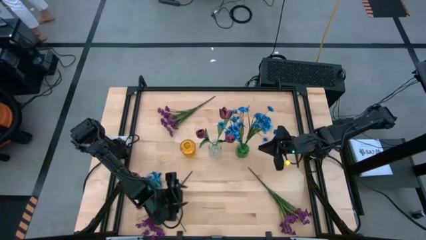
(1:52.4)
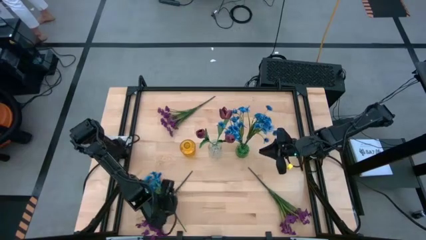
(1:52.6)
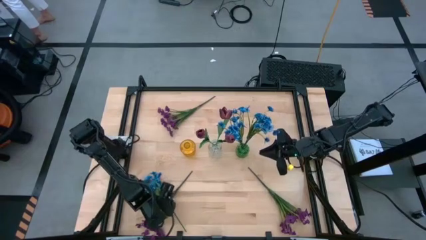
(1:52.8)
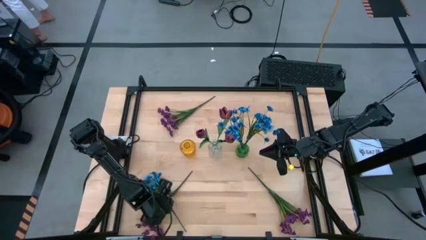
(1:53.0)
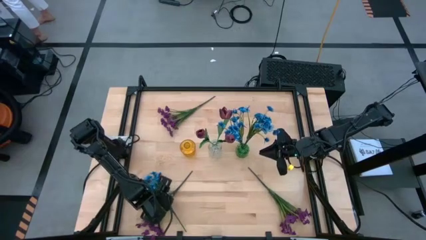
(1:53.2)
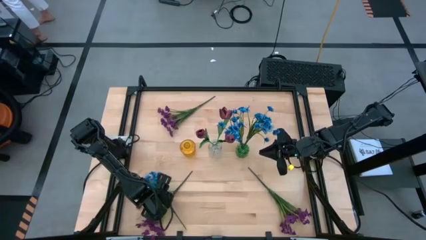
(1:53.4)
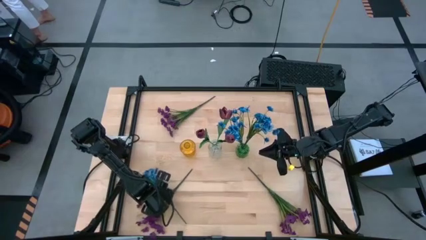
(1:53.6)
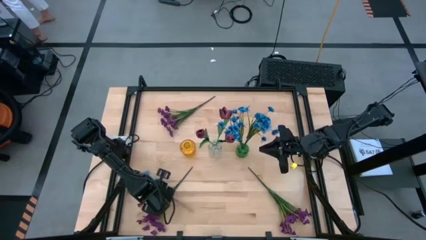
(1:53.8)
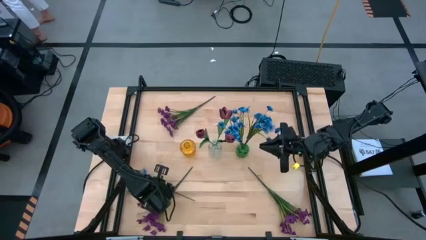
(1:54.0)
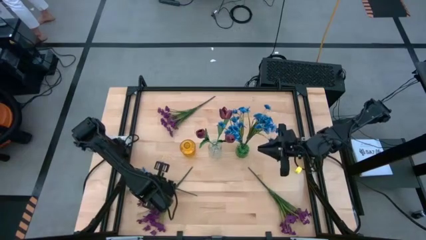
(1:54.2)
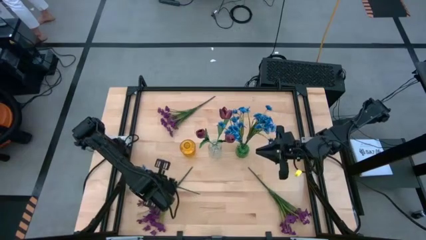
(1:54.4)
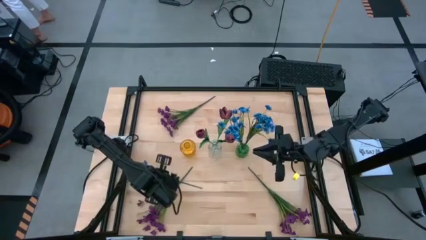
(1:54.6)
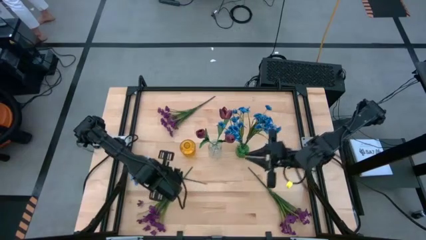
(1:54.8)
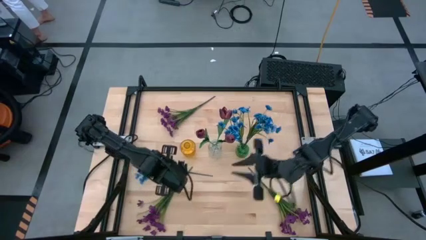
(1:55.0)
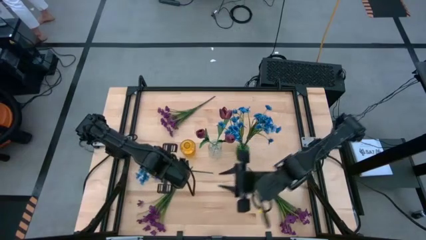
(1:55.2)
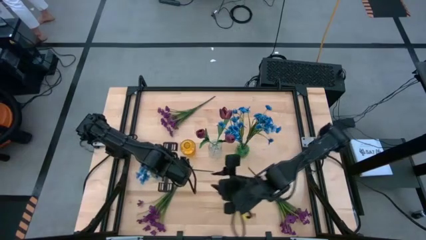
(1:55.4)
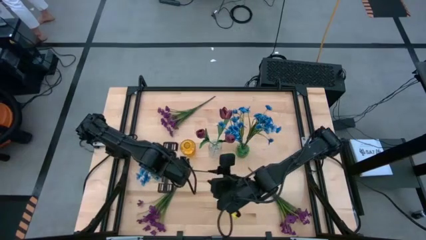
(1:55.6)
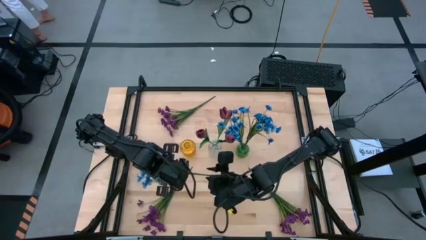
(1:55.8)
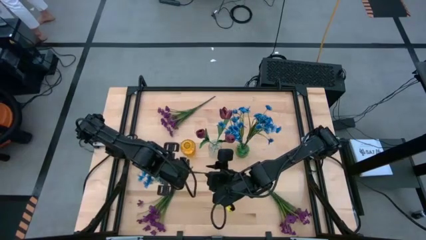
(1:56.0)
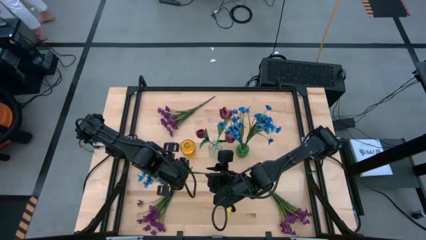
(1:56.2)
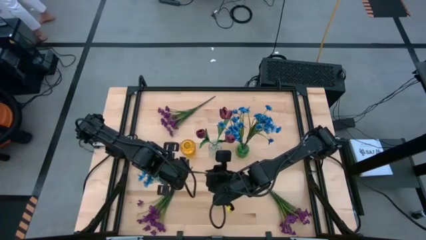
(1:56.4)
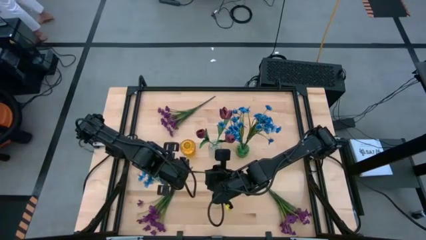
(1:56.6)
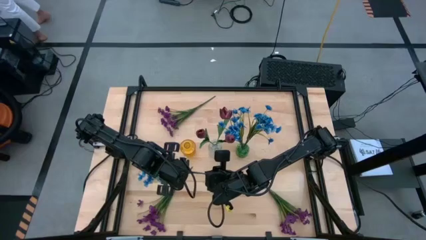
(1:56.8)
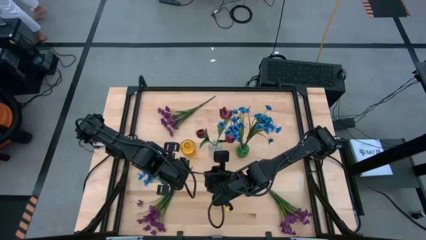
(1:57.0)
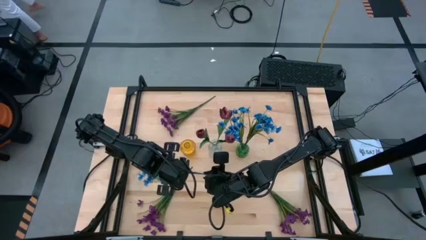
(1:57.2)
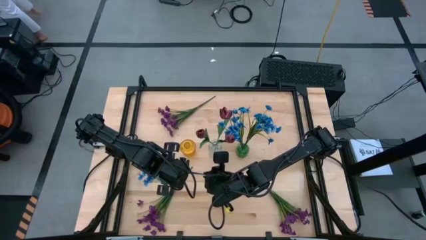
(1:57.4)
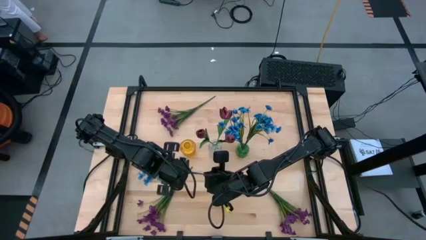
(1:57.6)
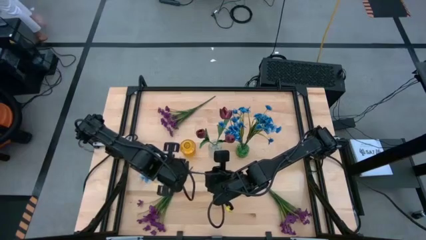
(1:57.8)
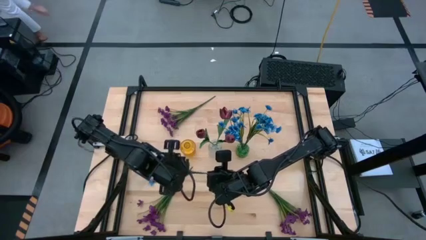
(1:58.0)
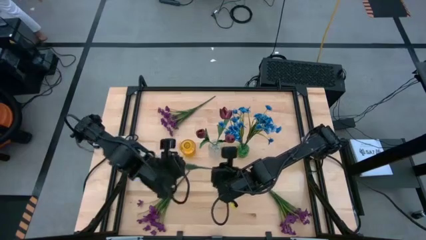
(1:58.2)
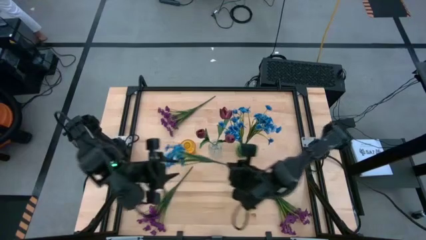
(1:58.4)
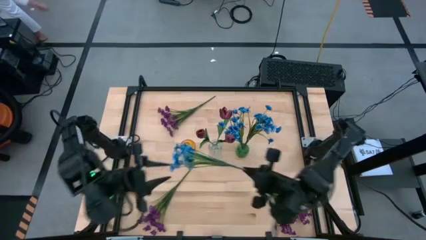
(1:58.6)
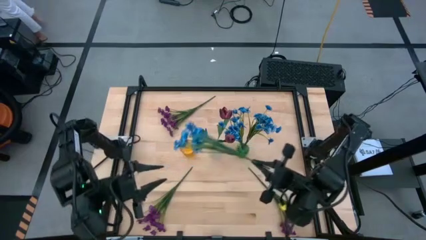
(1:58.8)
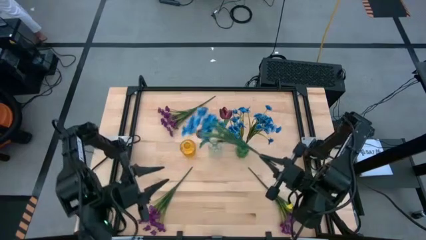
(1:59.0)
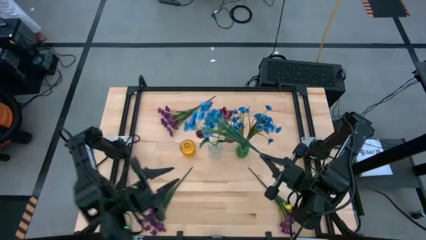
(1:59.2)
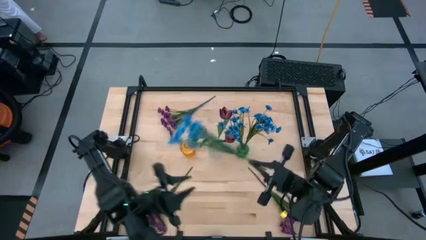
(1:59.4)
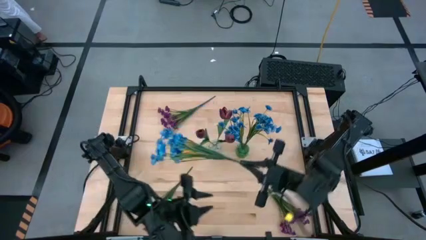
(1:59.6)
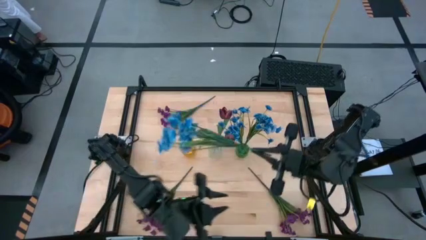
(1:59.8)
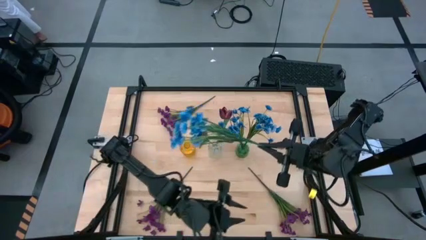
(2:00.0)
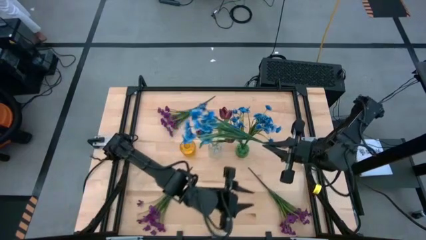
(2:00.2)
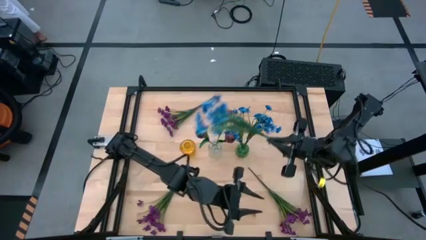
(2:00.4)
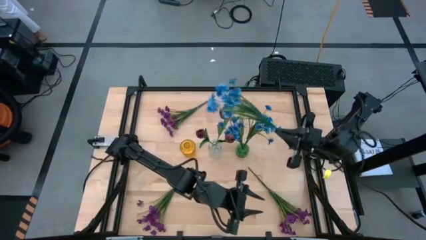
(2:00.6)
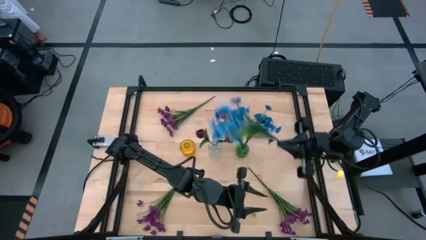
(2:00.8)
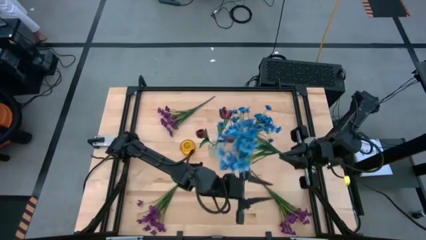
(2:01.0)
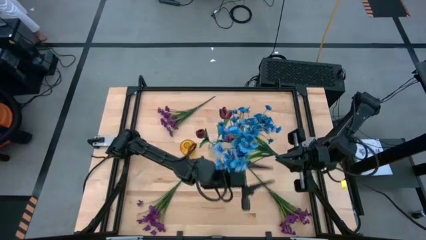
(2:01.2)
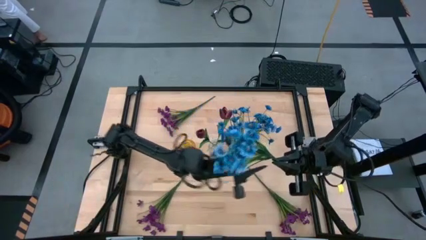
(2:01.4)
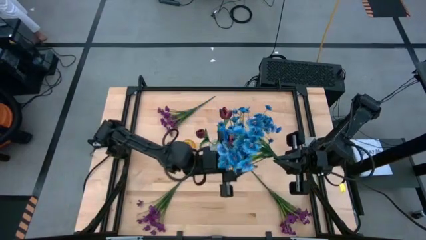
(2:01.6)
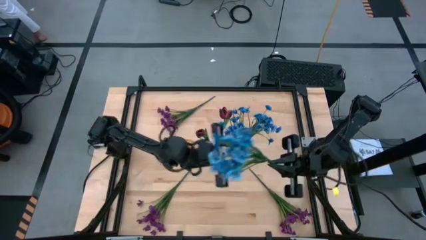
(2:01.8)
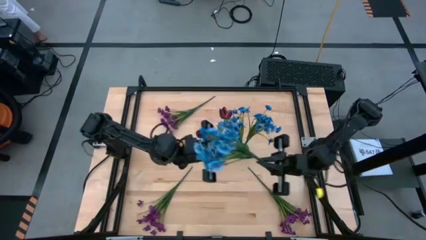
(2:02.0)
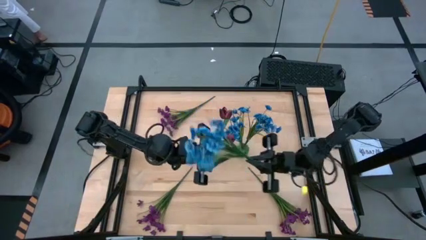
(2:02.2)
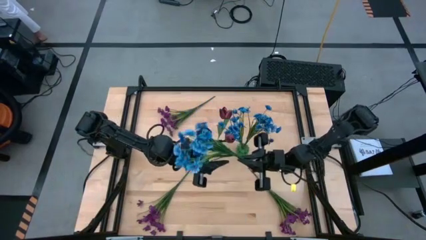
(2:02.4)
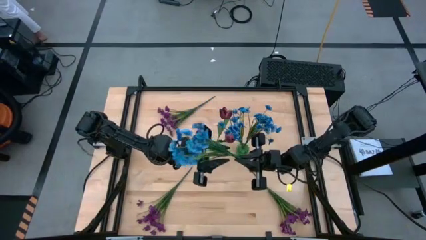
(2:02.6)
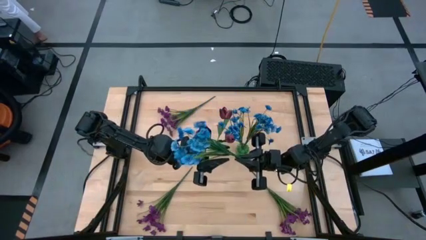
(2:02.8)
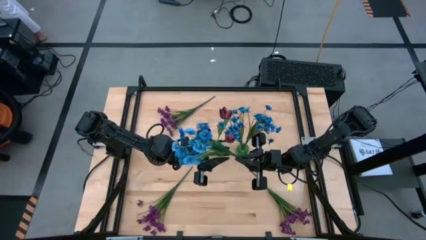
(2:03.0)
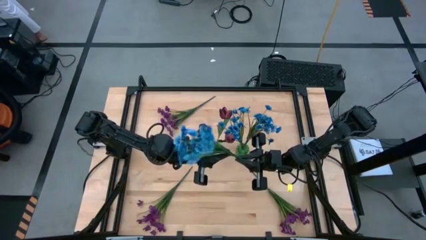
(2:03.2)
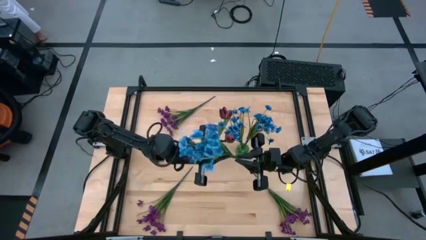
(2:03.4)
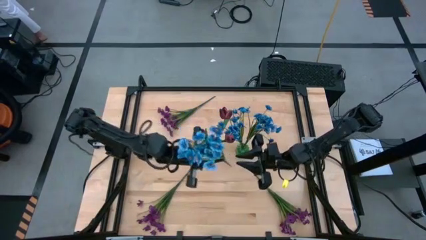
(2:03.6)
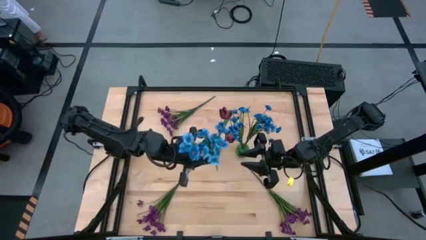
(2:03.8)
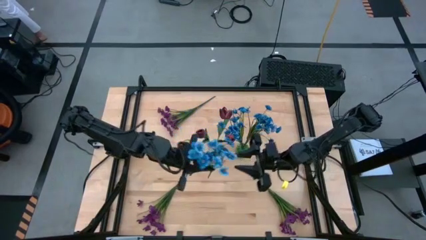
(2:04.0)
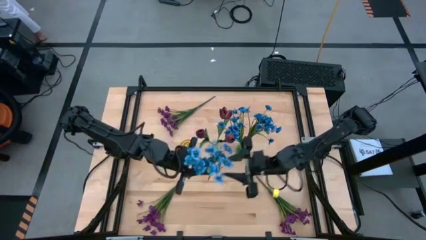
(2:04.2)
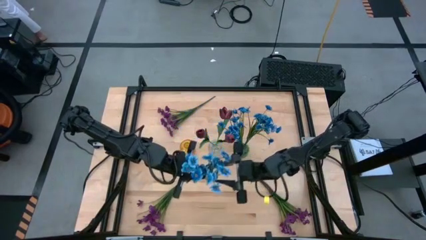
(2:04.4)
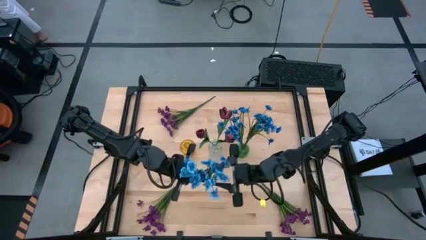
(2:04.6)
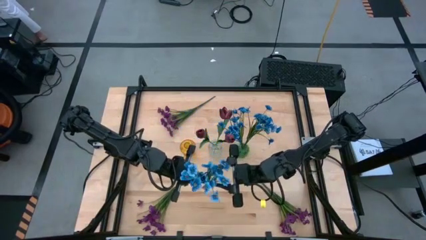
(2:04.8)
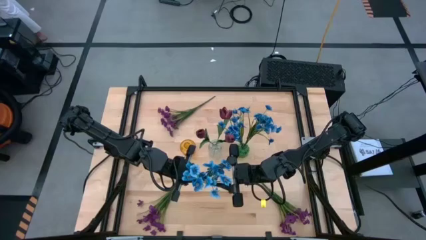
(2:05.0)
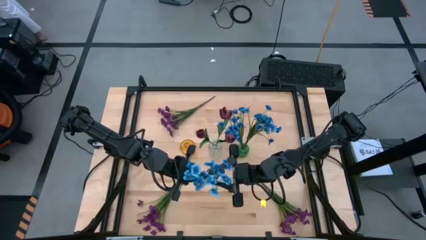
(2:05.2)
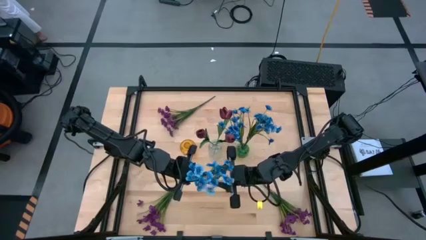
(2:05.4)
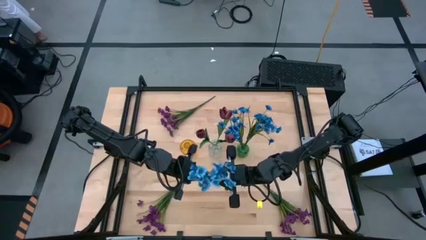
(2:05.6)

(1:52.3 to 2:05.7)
Task: Sort flowers into vase by color
Put the blue flowers into the green vase

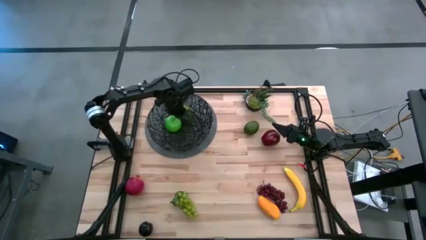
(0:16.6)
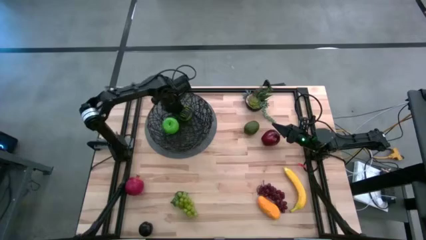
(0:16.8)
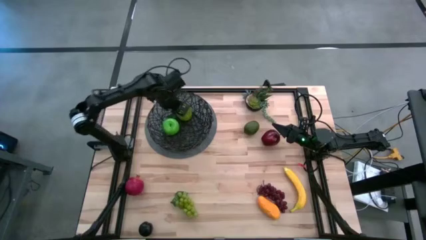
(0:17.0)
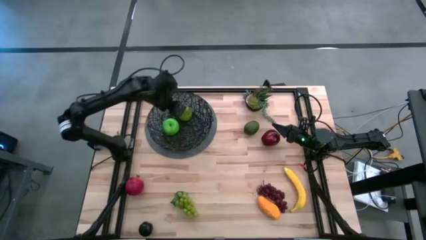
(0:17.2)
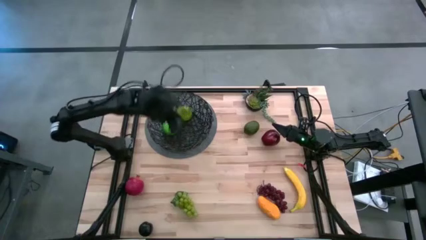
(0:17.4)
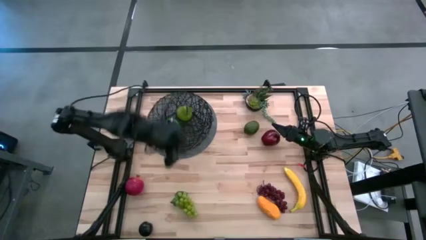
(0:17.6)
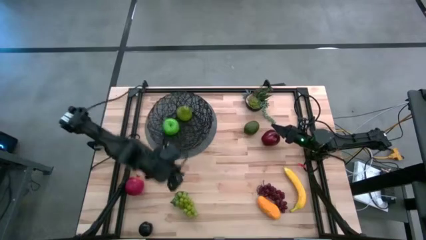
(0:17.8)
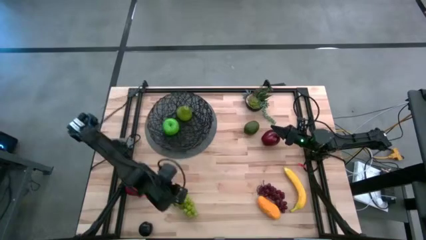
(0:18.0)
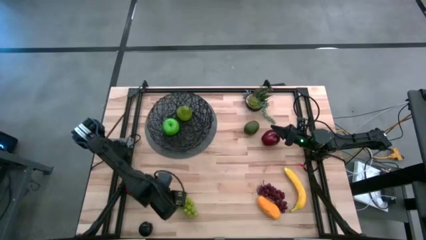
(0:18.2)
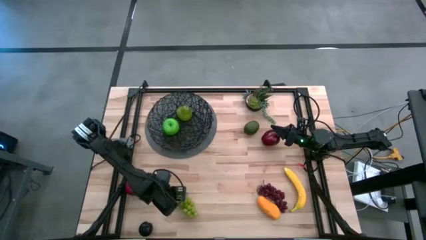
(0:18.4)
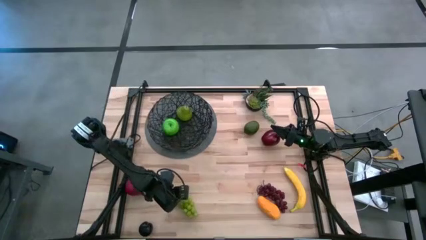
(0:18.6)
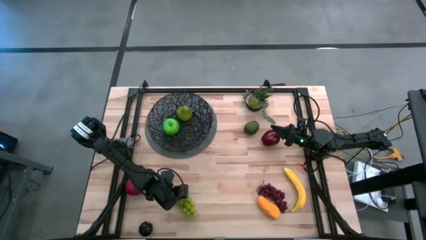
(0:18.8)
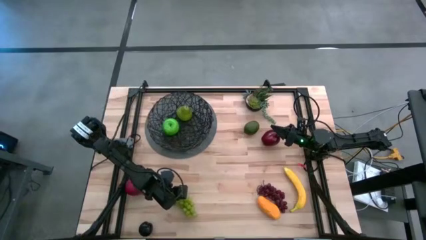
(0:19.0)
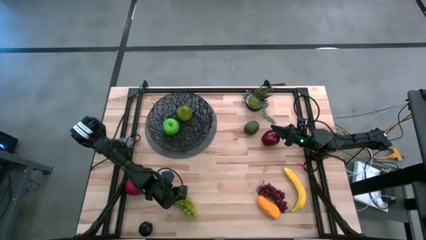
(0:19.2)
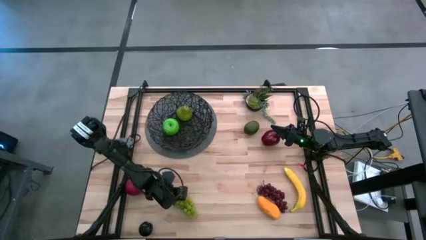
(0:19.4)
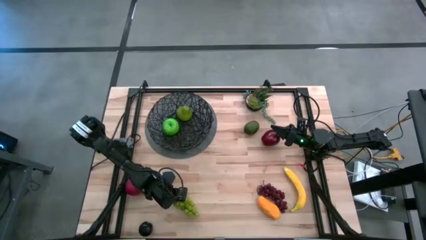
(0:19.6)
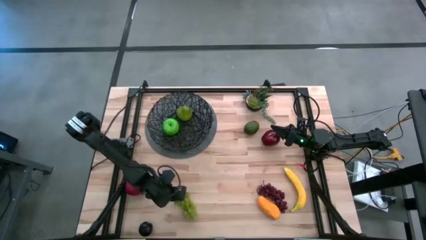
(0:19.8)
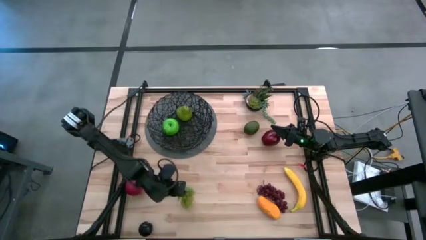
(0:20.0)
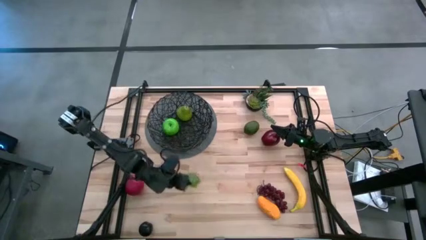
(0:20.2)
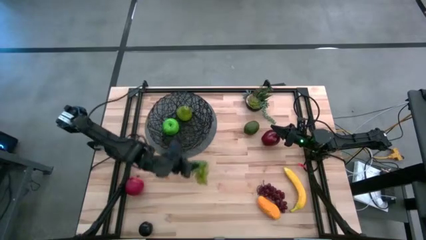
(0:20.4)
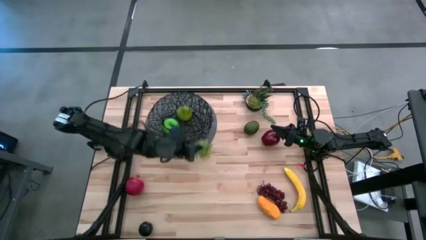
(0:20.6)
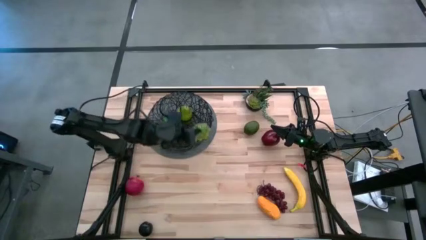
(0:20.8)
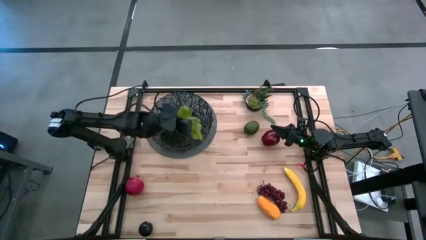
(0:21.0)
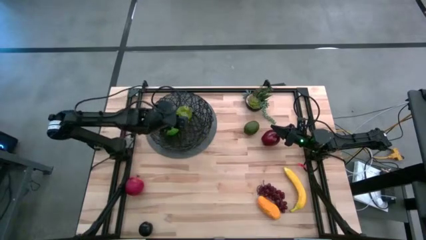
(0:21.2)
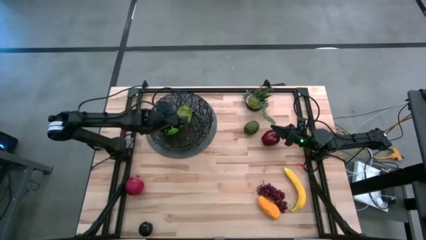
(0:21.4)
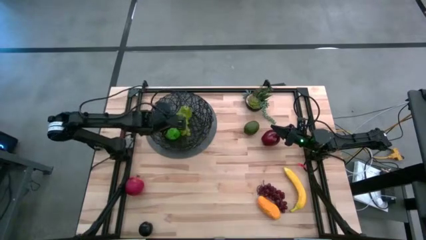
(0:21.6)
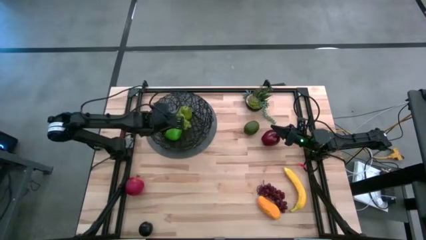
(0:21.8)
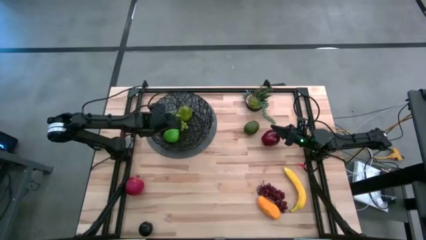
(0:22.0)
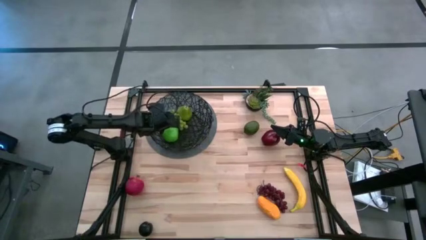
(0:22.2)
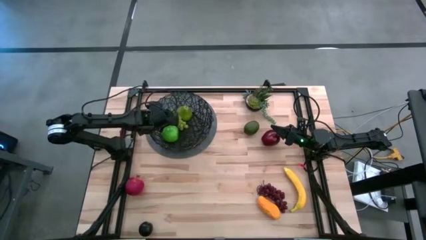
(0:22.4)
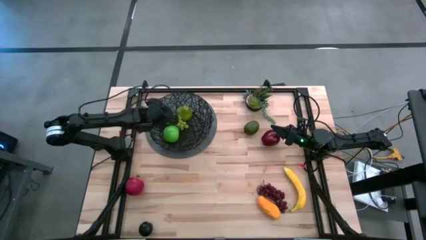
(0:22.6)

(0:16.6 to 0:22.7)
Task: Build produce basket
Put the green grapes into the black wire basket
